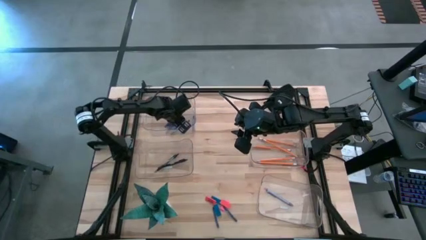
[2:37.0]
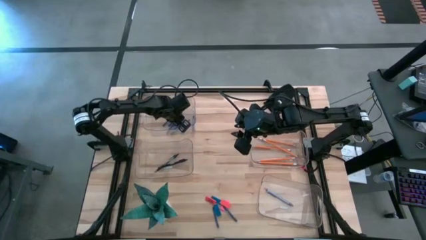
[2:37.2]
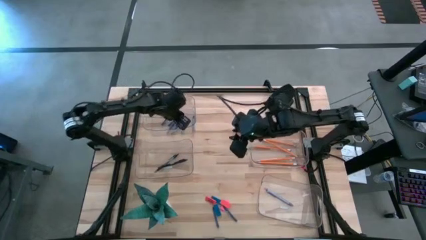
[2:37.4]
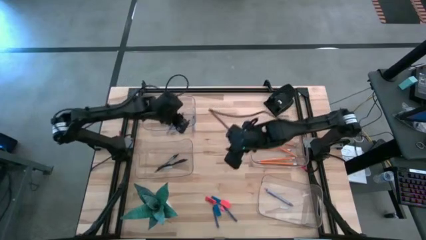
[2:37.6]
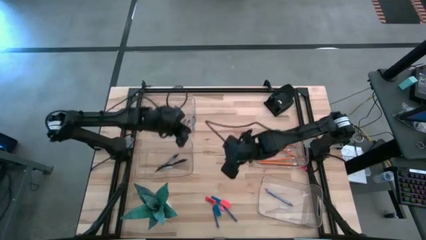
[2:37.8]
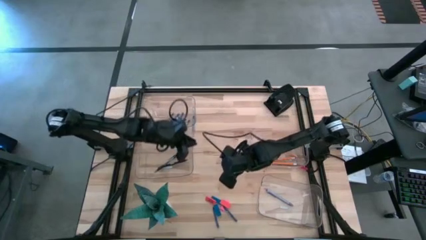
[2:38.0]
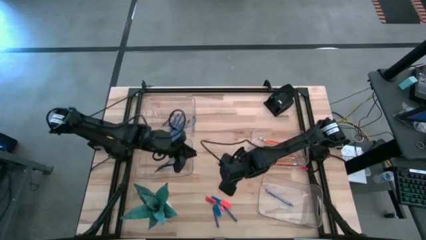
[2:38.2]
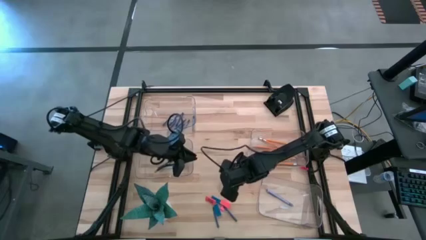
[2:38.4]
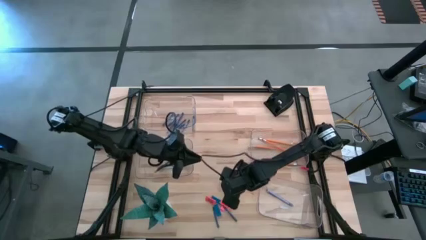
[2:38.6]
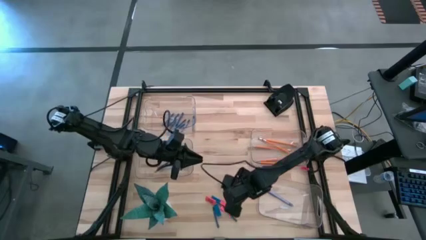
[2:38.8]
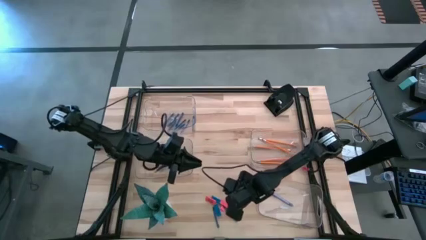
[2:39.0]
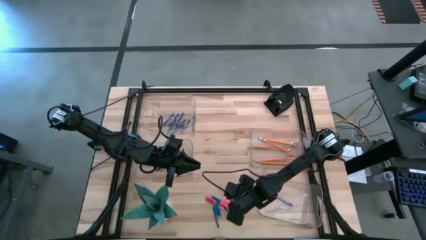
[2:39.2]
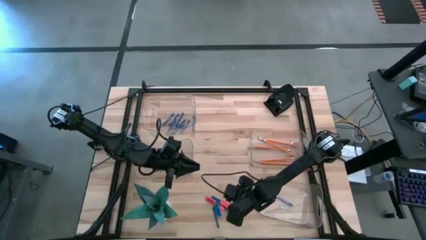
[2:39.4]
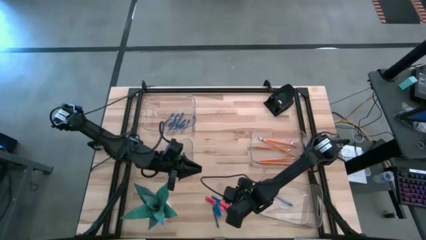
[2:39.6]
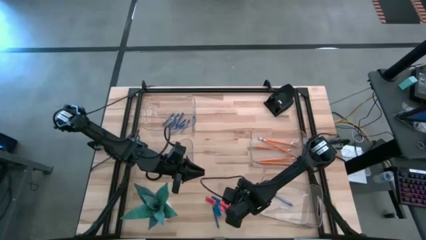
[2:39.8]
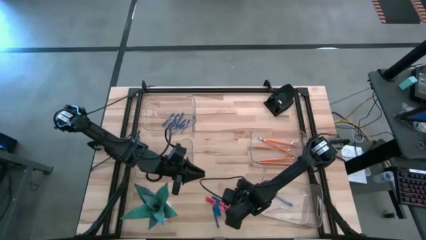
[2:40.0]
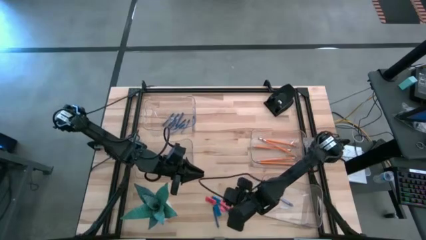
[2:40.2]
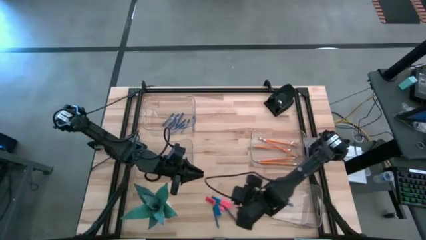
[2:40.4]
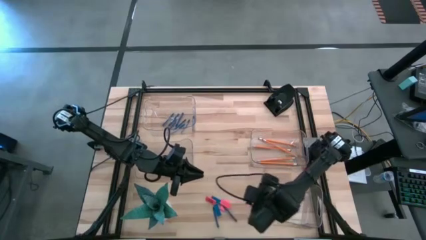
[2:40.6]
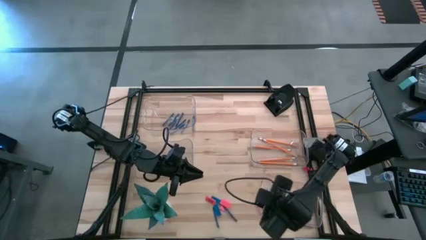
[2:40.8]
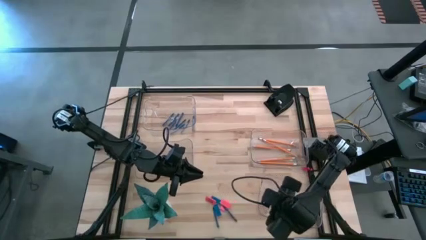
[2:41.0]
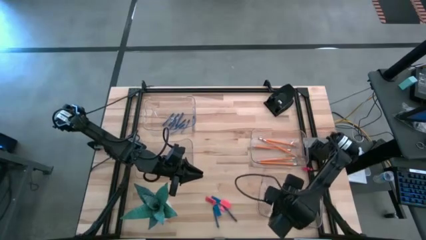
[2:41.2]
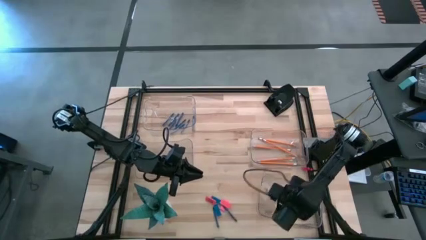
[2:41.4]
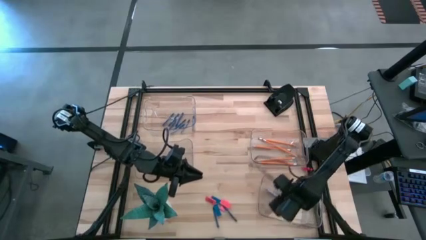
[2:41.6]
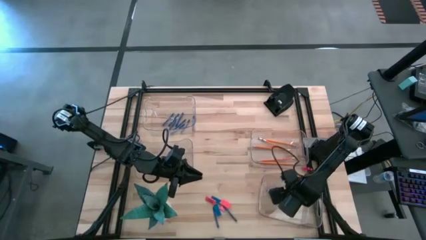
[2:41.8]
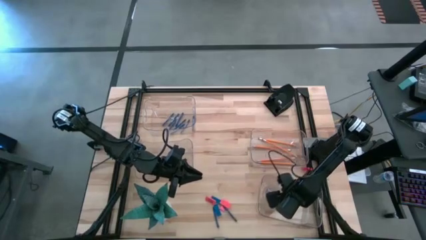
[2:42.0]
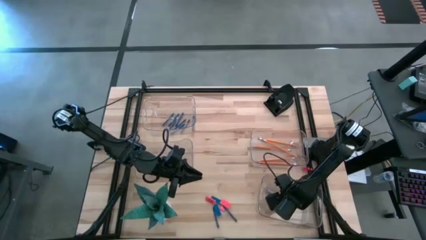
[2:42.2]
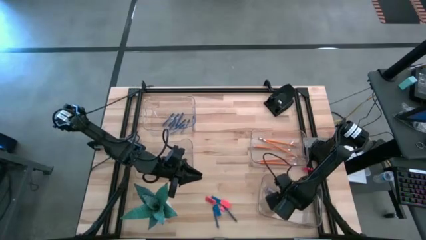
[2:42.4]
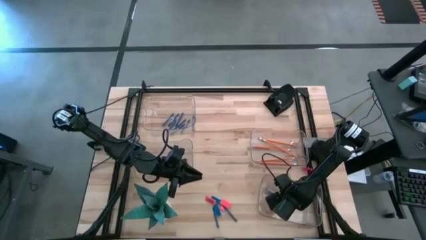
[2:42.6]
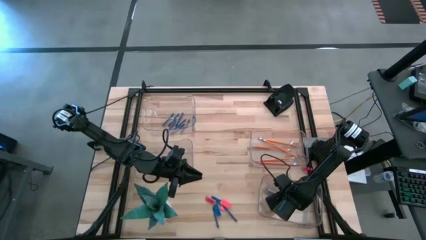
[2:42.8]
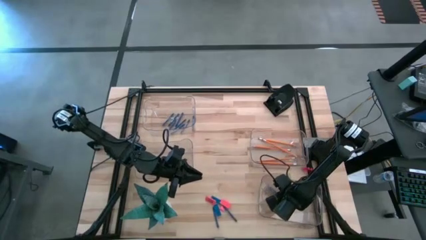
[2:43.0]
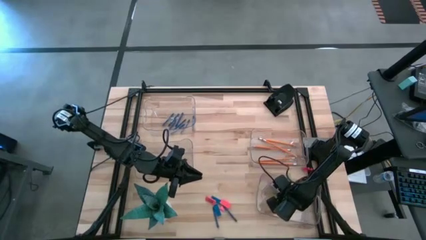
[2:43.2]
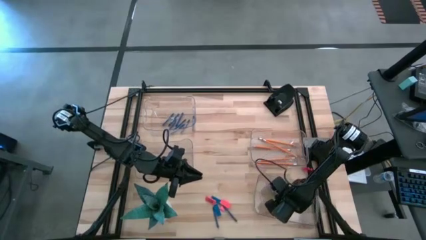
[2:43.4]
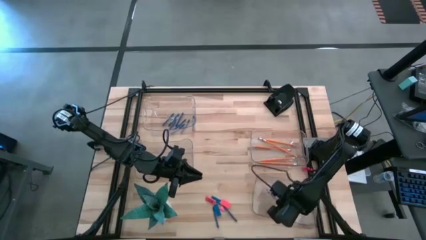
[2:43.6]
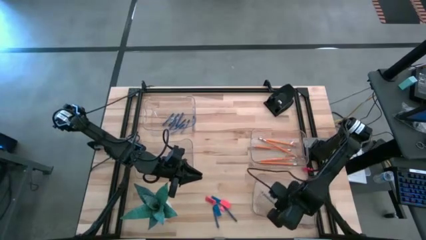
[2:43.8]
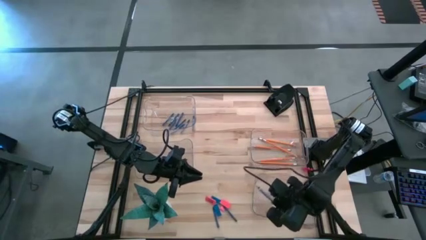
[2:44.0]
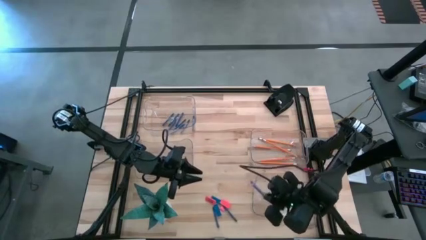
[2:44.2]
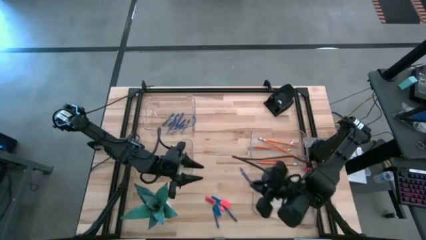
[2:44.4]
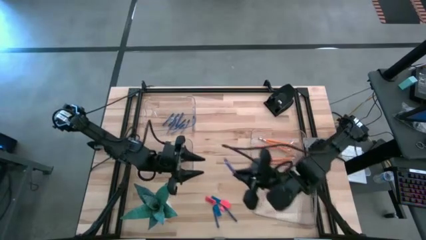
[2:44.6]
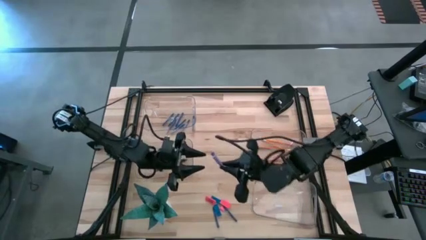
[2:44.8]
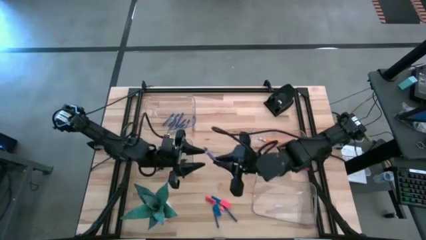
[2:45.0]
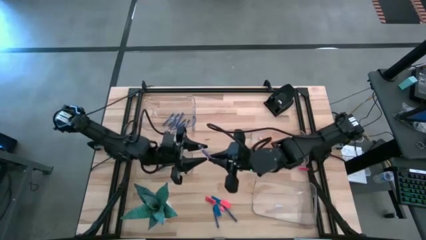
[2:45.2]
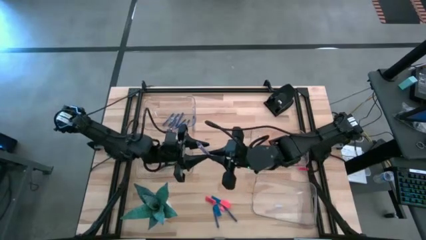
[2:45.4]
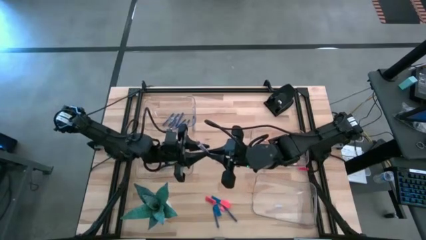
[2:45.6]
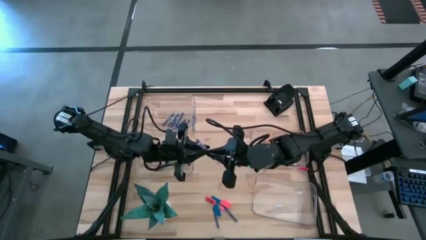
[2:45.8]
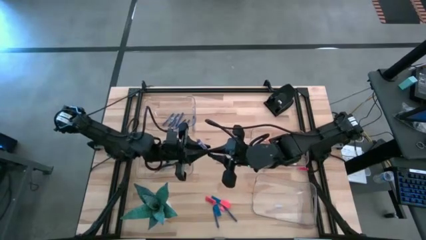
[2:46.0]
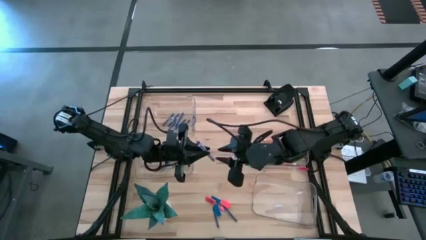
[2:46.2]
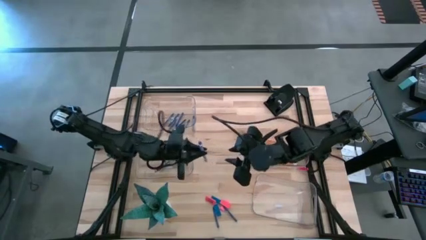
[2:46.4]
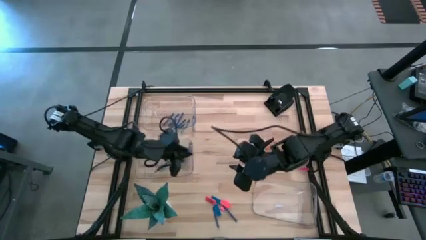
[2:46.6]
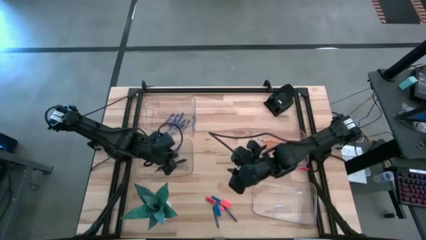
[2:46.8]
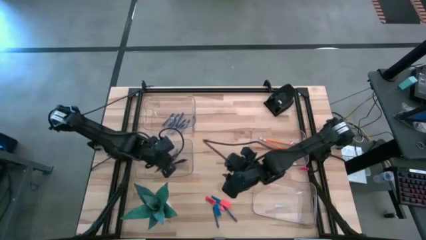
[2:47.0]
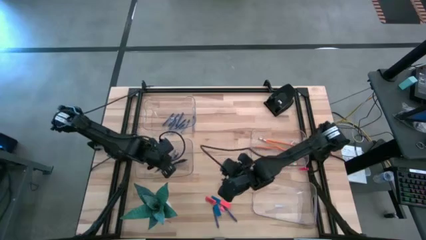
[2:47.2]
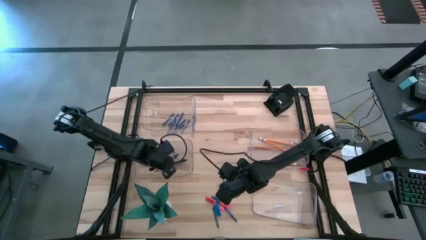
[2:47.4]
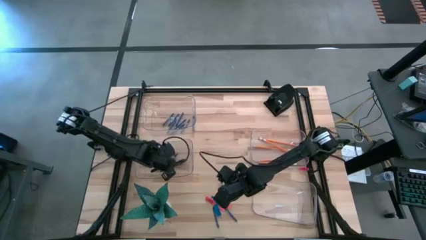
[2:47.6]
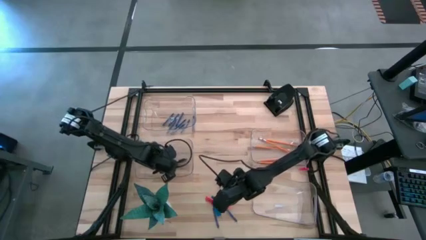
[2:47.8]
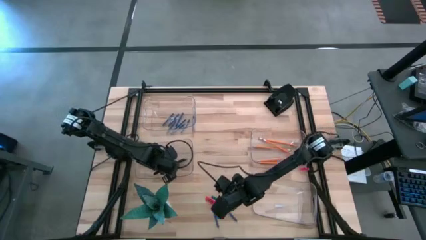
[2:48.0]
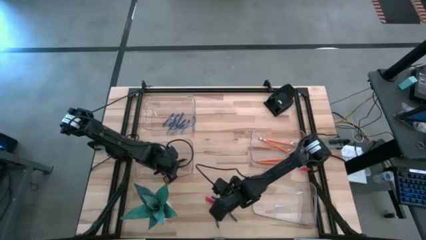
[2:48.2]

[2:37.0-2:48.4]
Task: Sort crayons/erasers/pens/pencils in bins
Put the purple pen from the bottom transparent bin into the middle left transparent bin

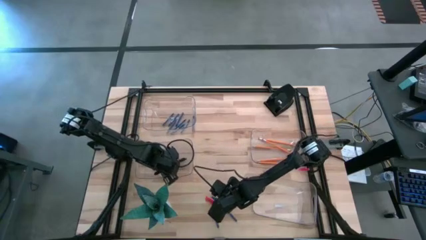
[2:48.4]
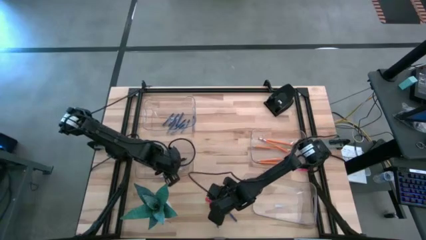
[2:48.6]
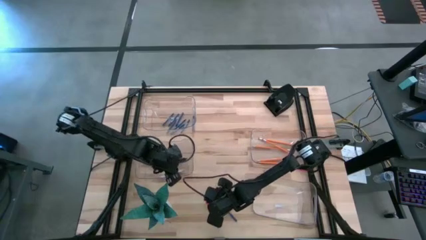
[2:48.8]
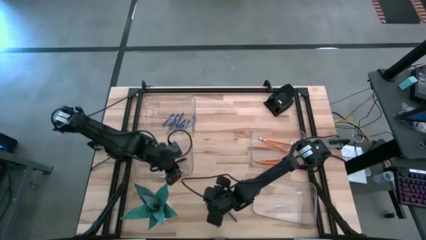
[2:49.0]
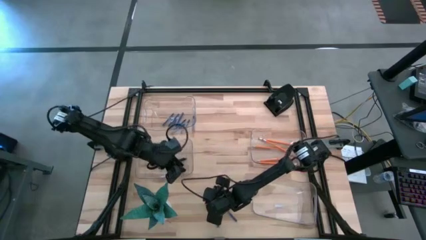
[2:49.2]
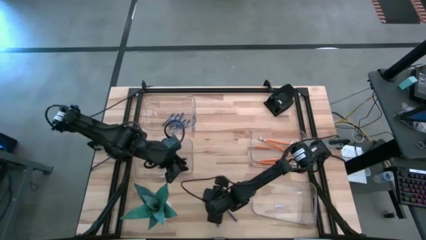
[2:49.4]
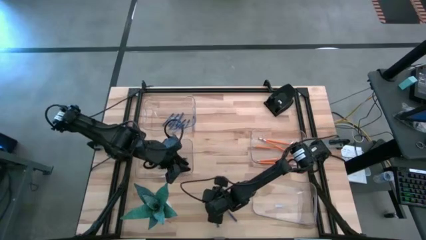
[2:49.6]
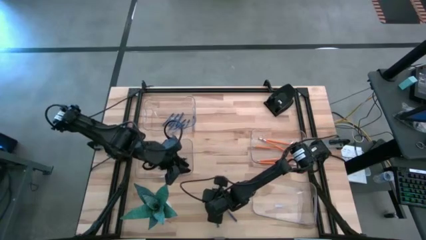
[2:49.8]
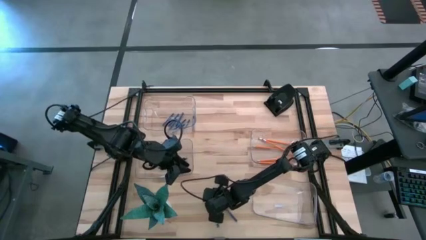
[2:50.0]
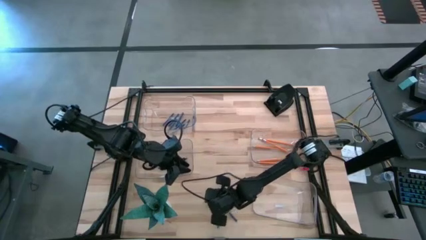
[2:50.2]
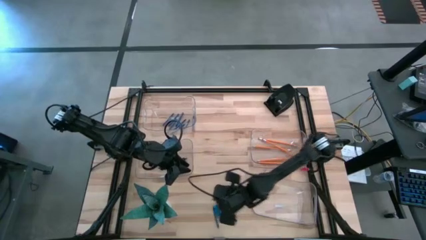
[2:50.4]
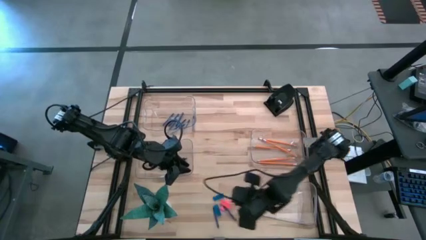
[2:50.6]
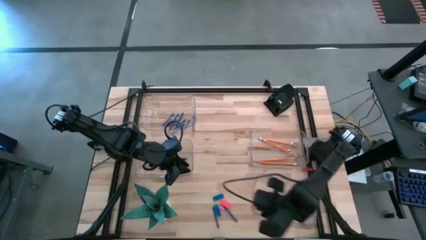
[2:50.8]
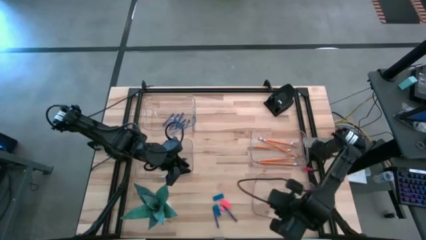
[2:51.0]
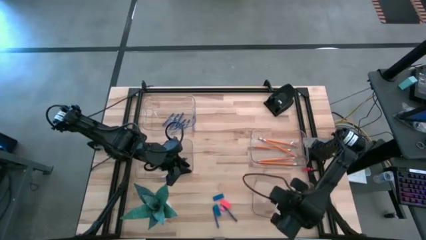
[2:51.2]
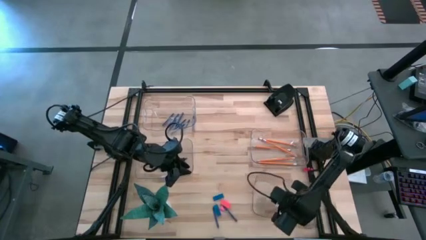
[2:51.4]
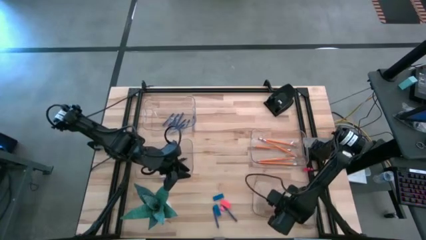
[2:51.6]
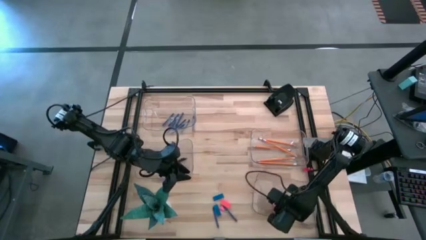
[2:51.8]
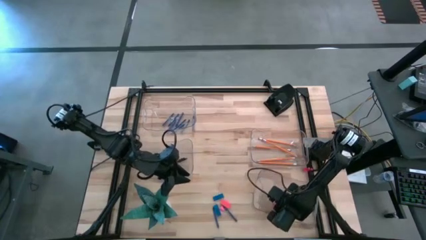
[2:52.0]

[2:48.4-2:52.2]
Put the orange eraser into the bottom transparent bin

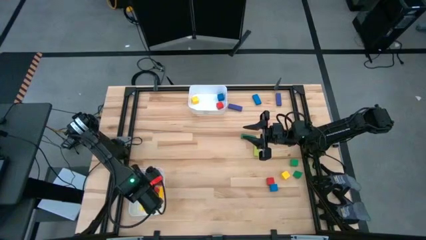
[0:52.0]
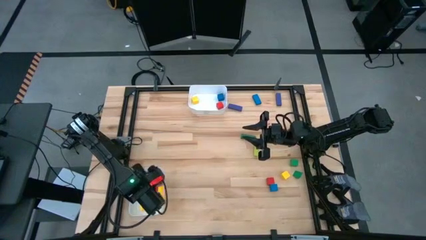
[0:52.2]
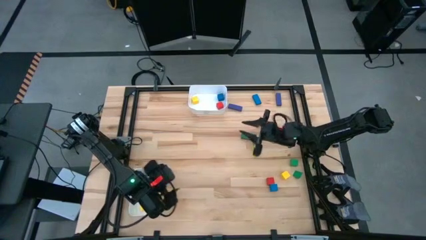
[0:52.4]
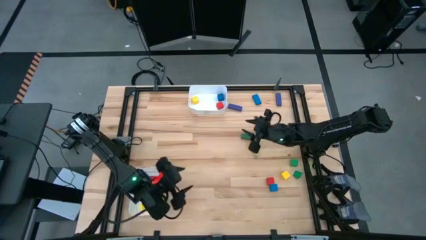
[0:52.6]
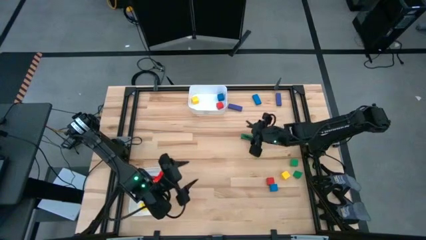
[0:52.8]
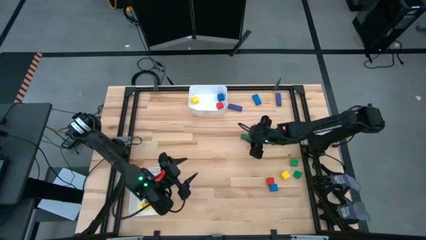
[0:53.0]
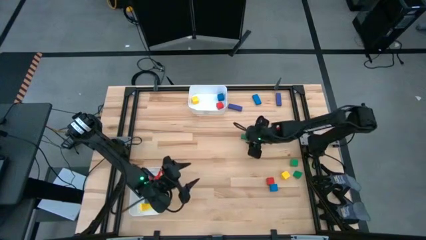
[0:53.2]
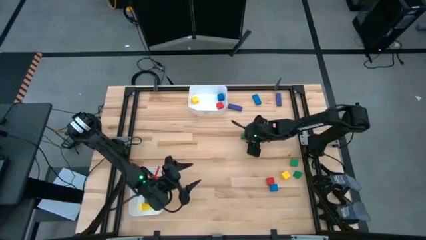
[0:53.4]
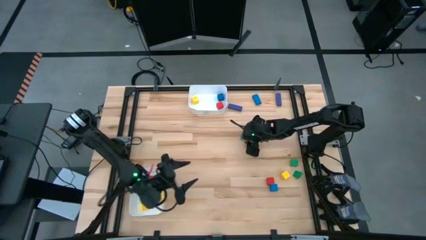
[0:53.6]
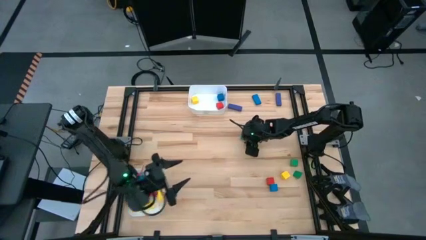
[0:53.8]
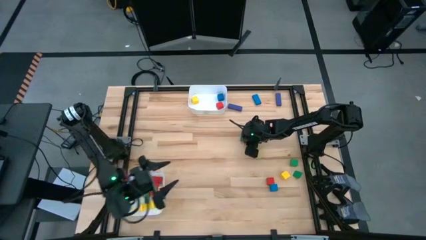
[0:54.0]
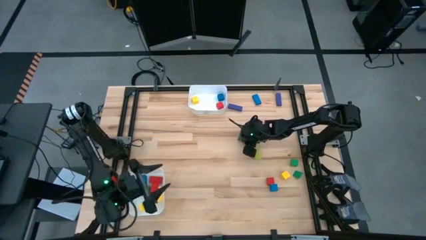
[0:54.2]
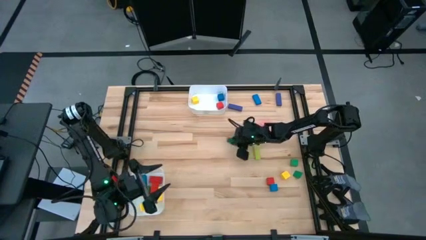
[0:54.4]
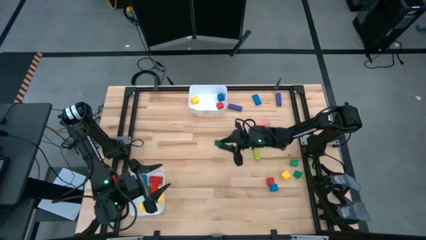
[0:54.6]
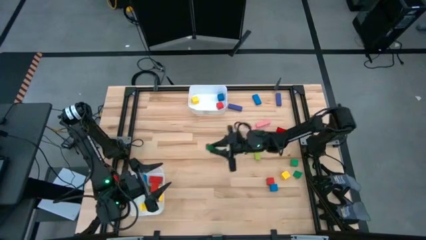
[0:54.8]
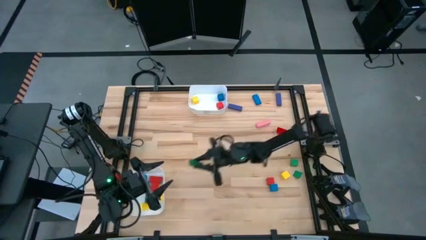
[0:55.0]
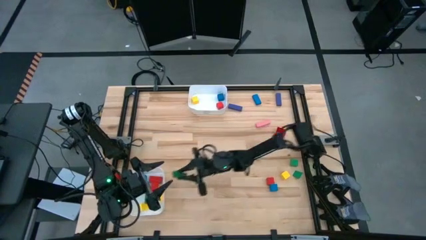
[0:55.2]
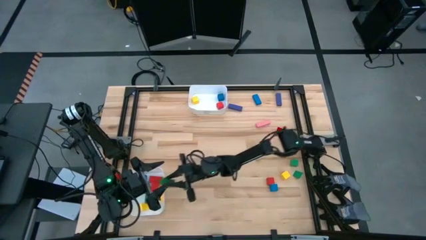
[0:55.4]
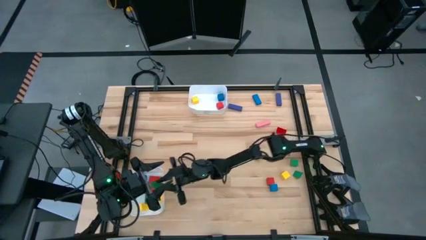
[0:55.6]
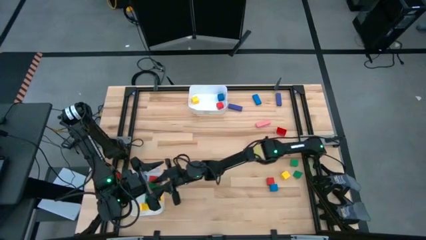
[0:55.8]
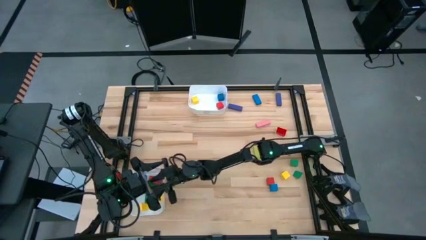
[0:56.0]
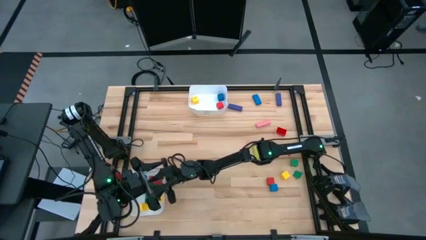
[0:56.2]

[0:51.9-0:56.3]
Task: Sort blocks by size
Put the green rectangular block into the bottom white bin
